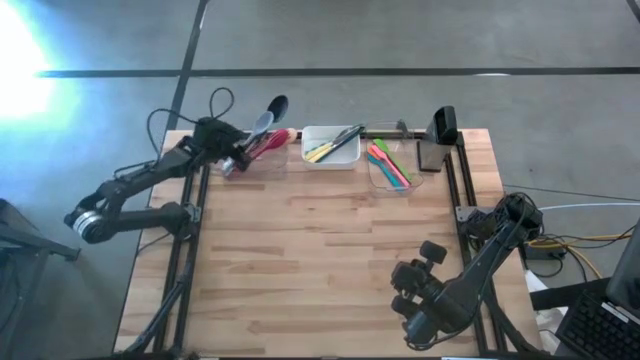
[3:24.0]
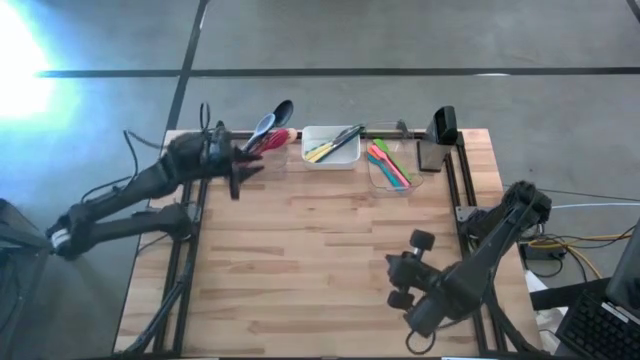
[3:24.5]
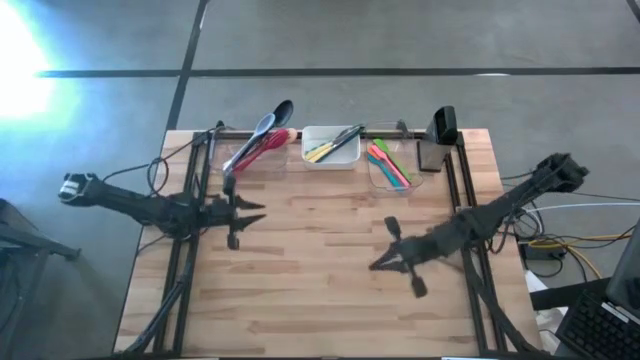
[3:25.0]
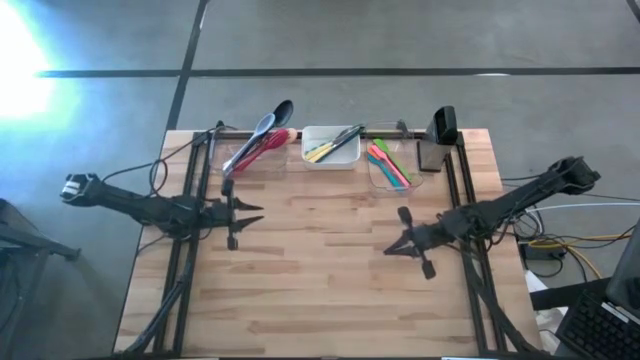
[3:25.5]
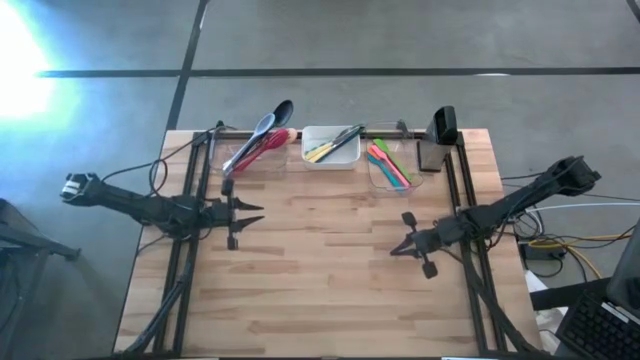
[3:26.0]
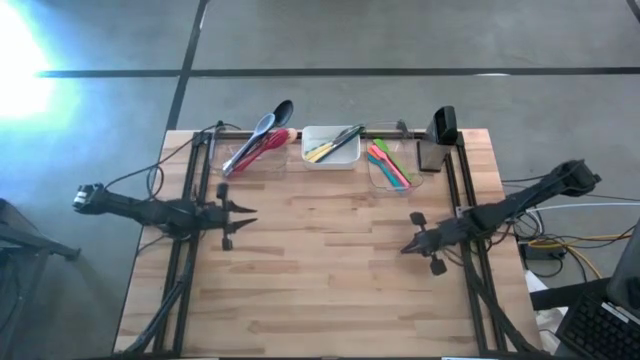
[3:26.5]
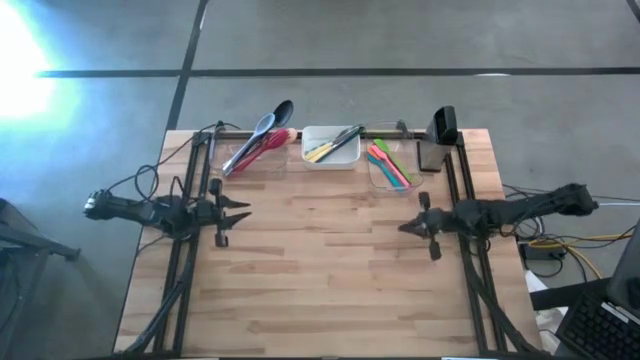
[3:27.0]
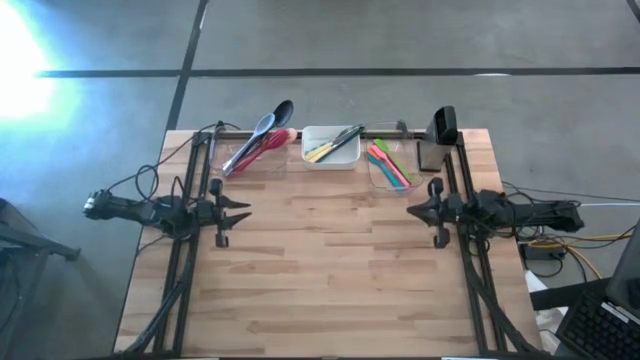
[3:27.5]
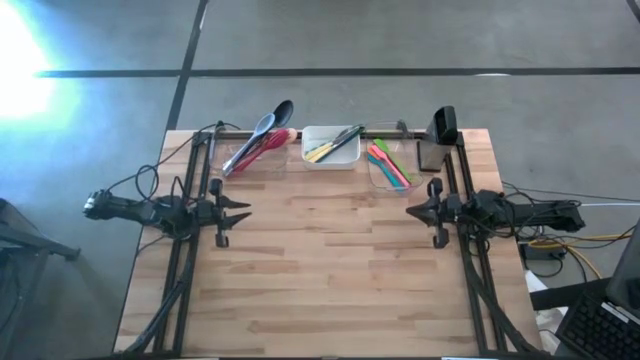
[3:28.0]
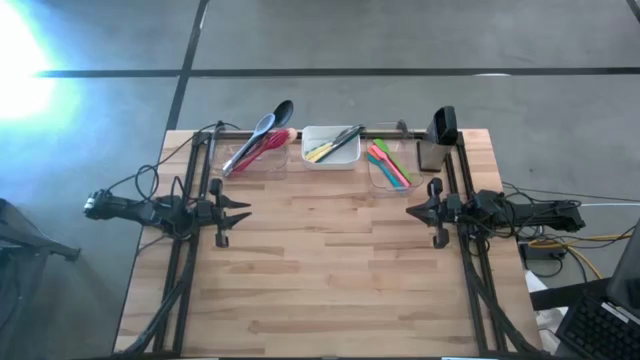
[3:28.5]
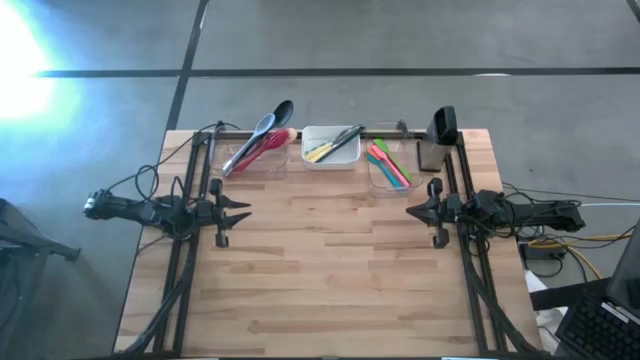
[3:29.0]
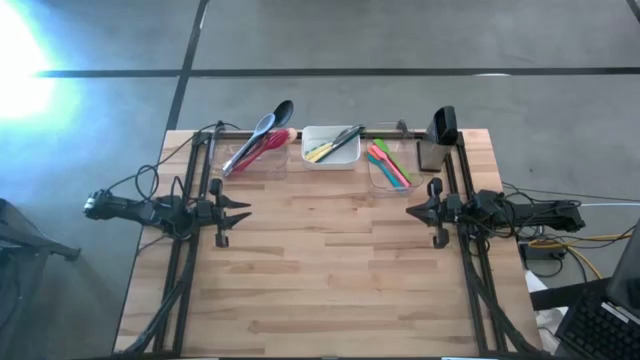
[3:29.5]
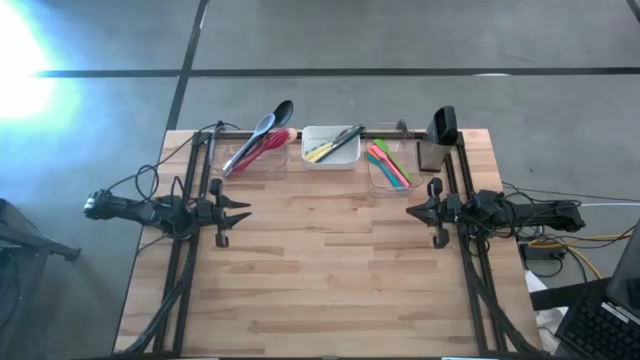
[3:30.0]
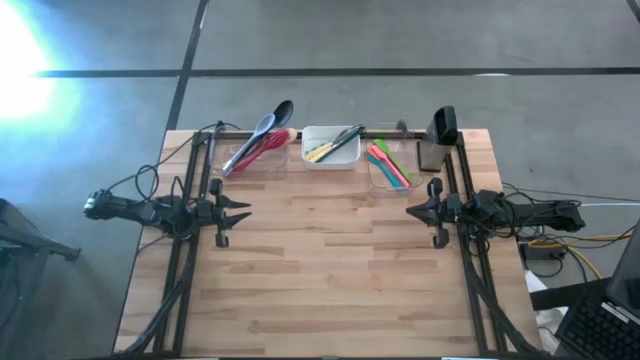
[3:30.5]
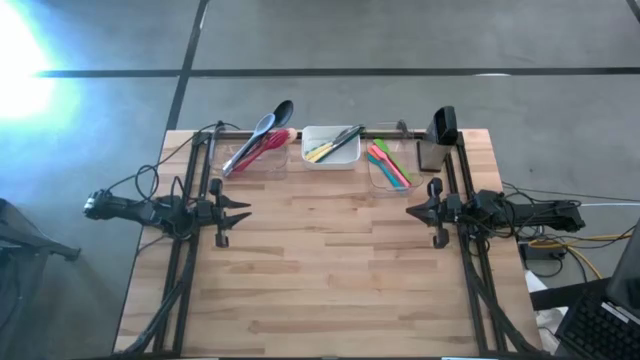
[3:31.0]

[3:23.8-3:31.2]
Task: Pick & Place Kitchen Items
Return to Home Position

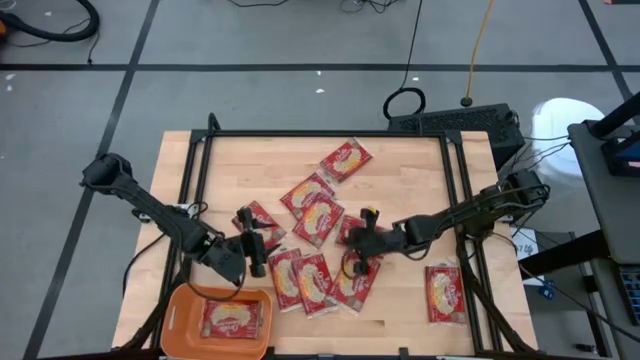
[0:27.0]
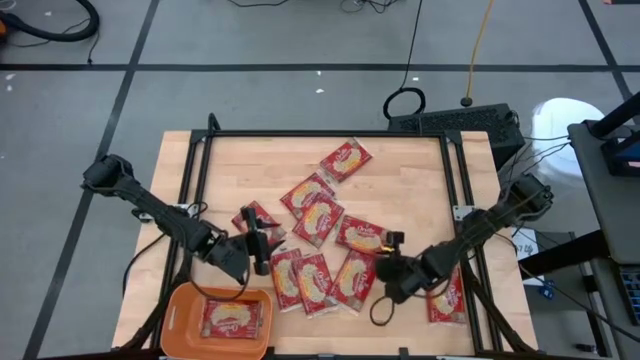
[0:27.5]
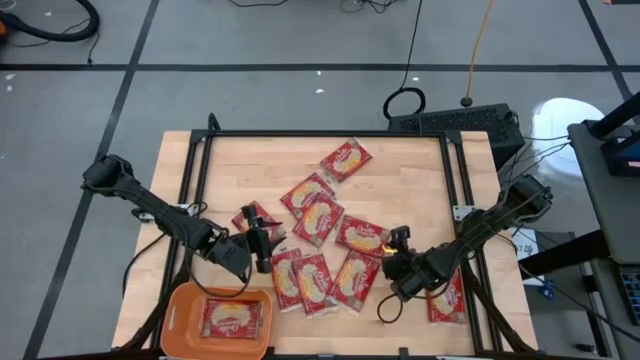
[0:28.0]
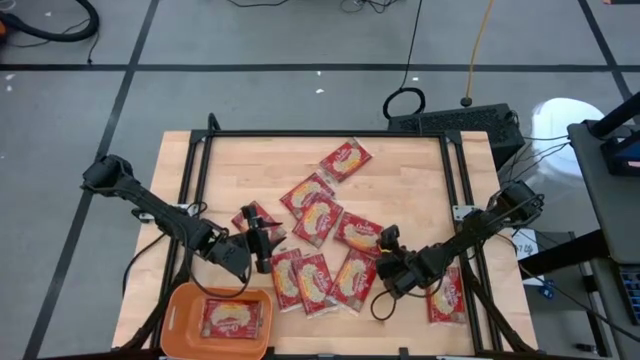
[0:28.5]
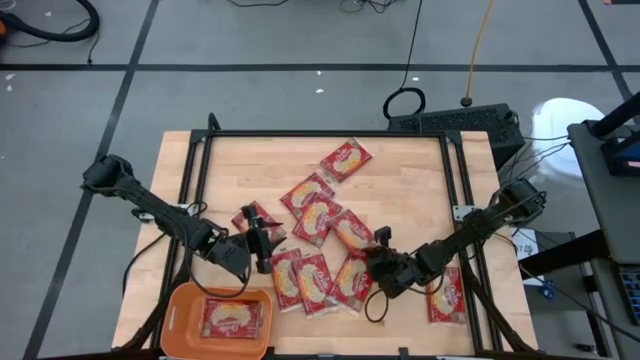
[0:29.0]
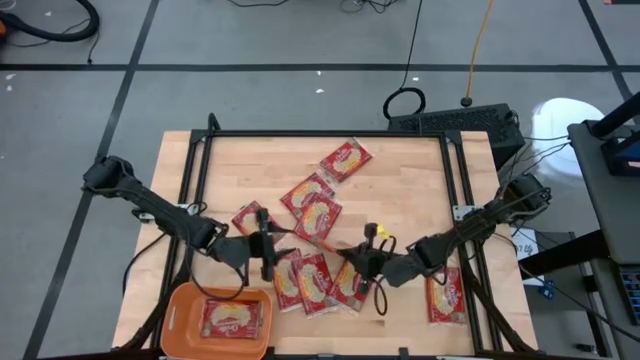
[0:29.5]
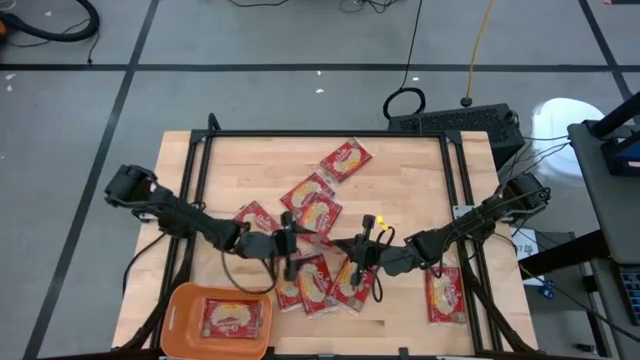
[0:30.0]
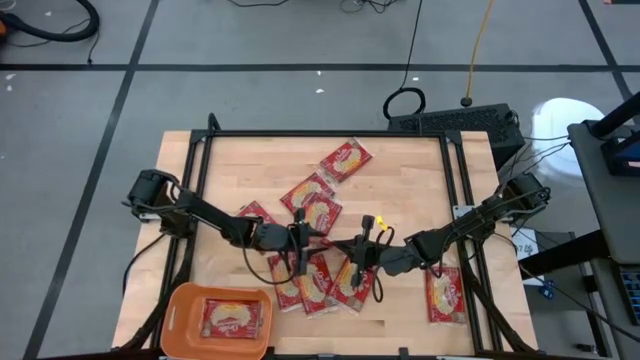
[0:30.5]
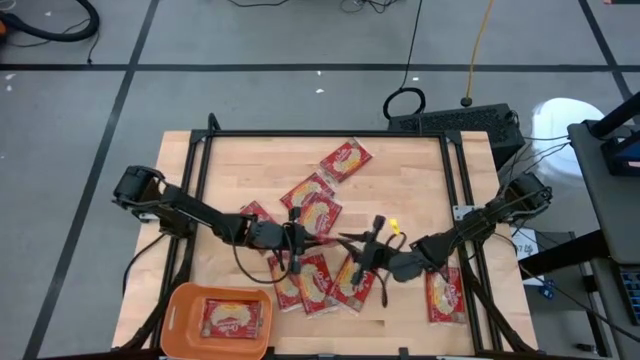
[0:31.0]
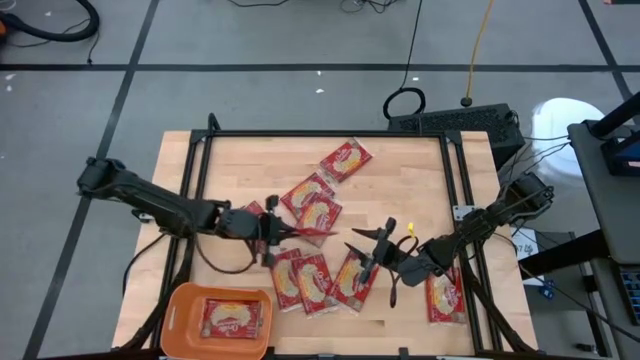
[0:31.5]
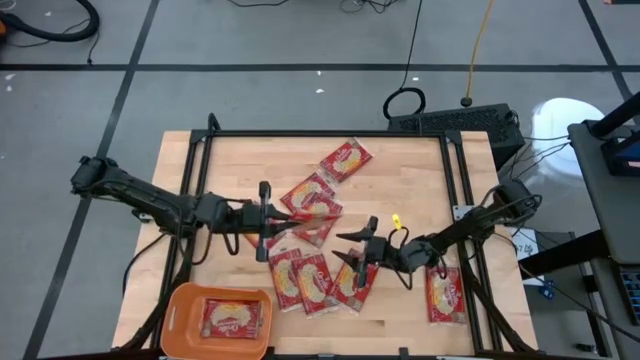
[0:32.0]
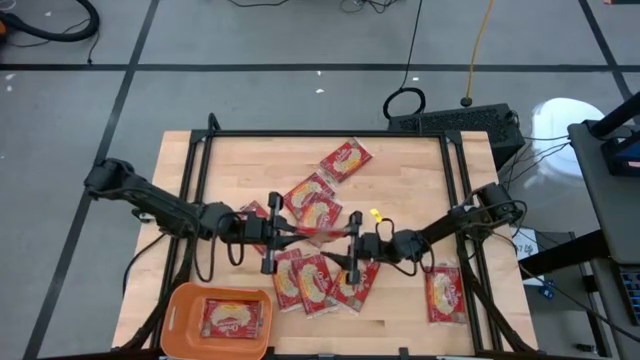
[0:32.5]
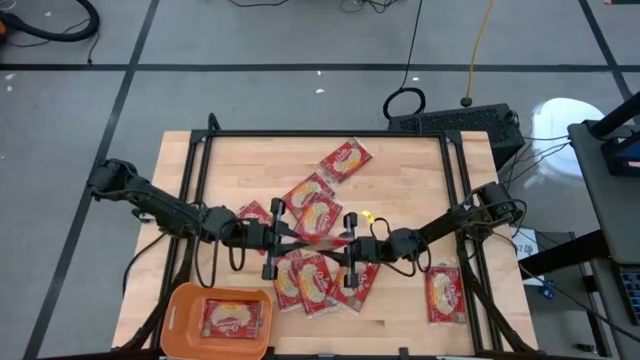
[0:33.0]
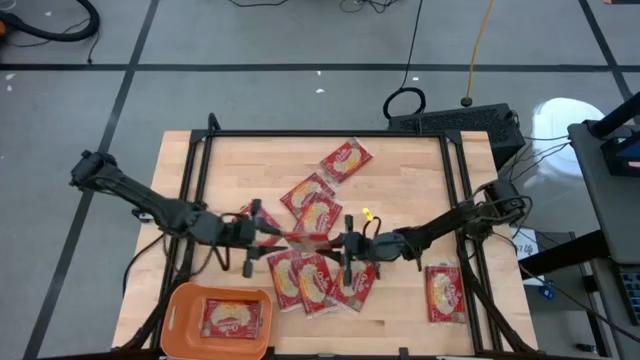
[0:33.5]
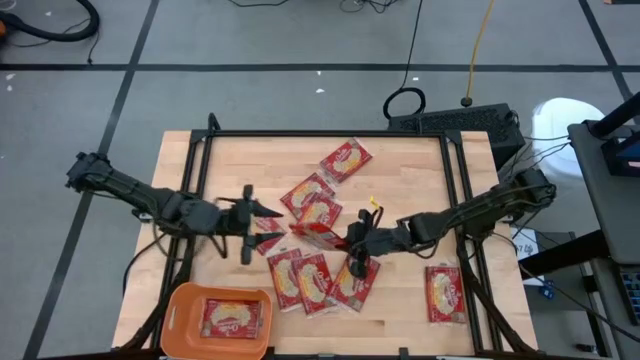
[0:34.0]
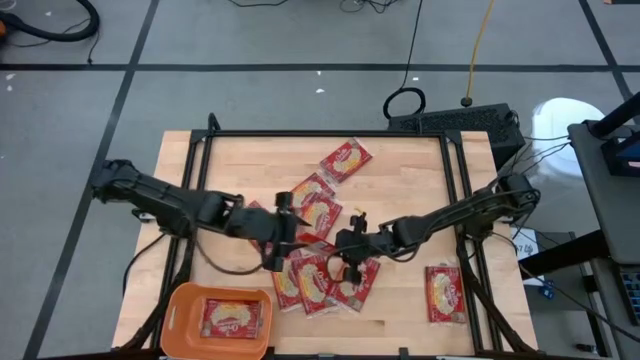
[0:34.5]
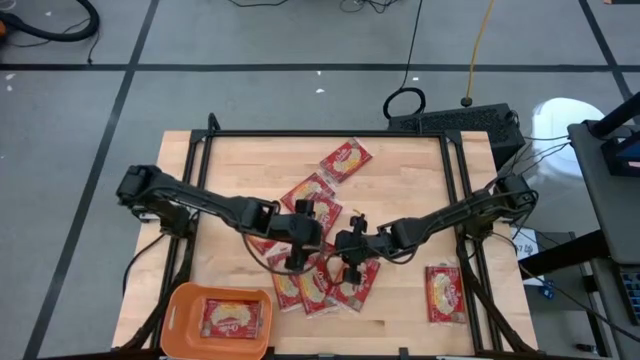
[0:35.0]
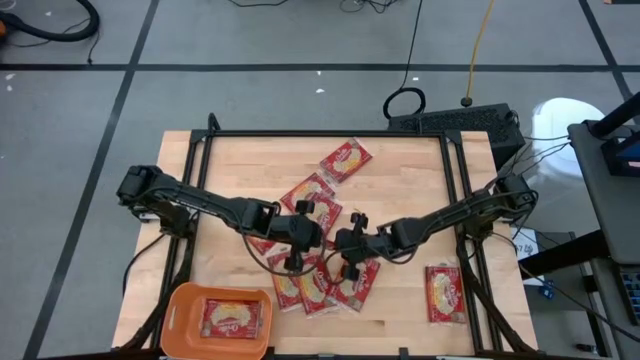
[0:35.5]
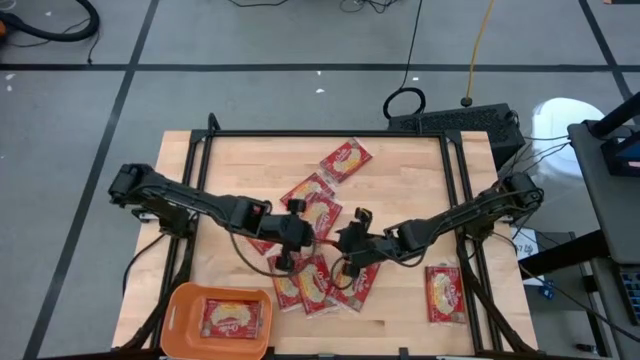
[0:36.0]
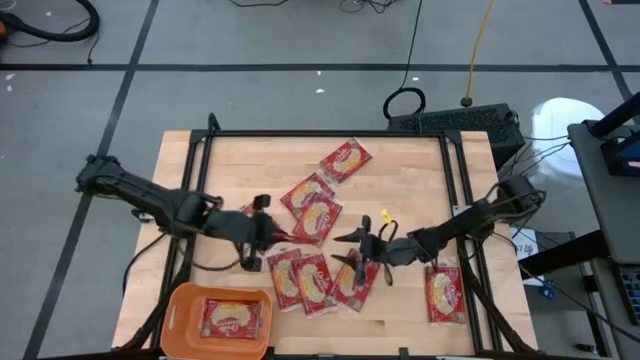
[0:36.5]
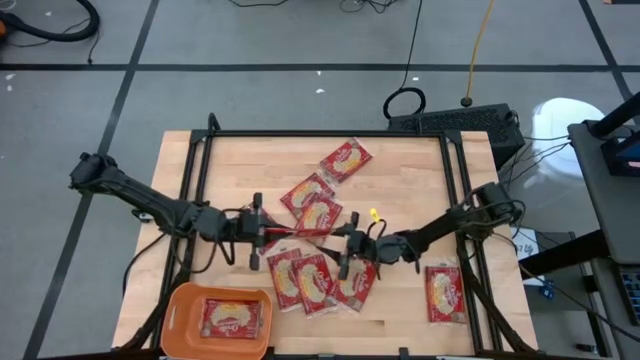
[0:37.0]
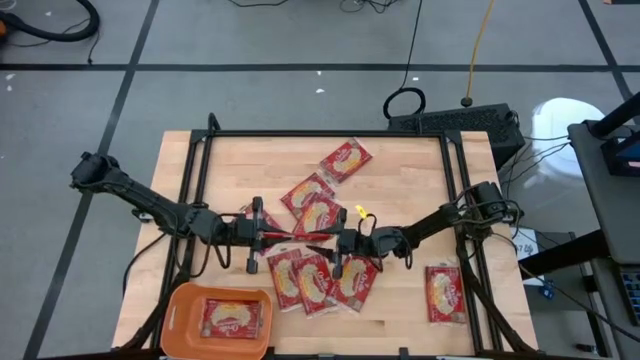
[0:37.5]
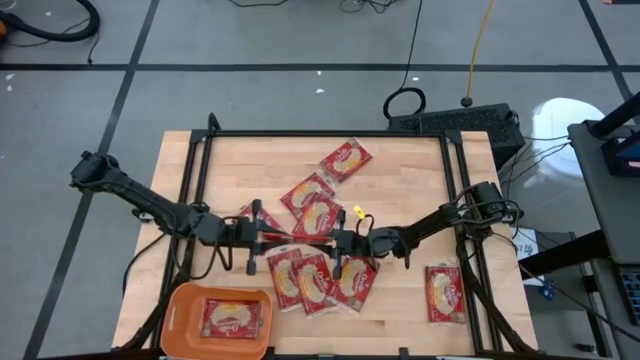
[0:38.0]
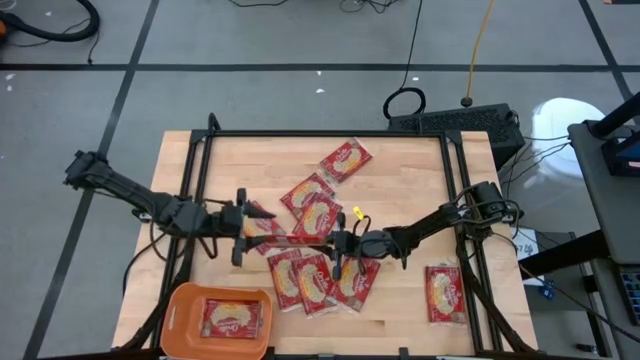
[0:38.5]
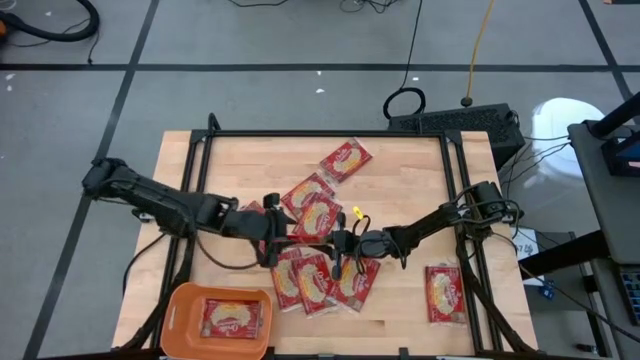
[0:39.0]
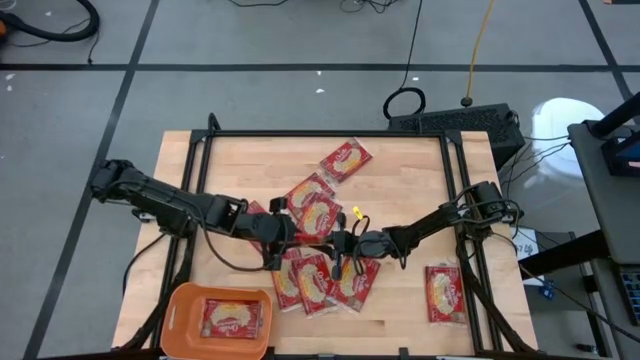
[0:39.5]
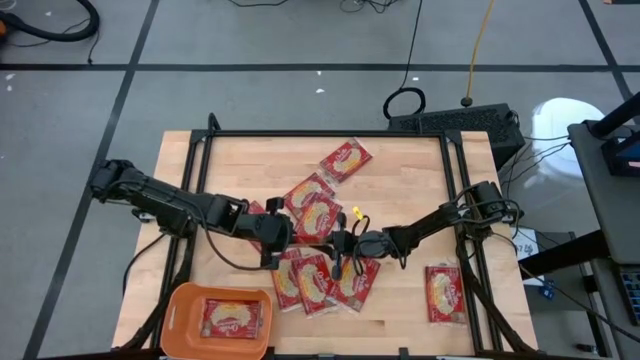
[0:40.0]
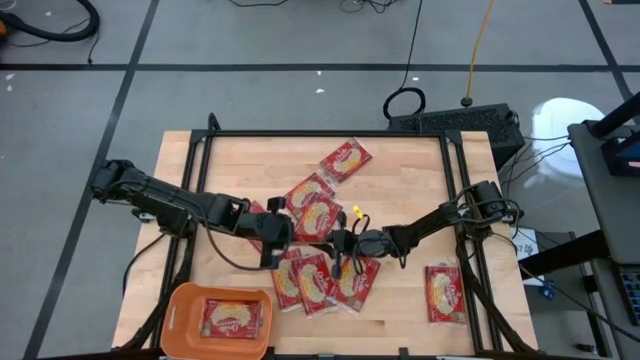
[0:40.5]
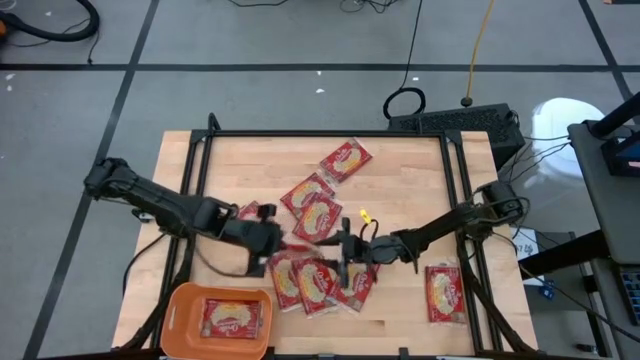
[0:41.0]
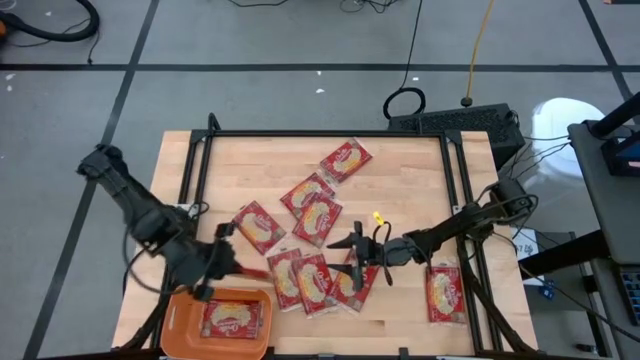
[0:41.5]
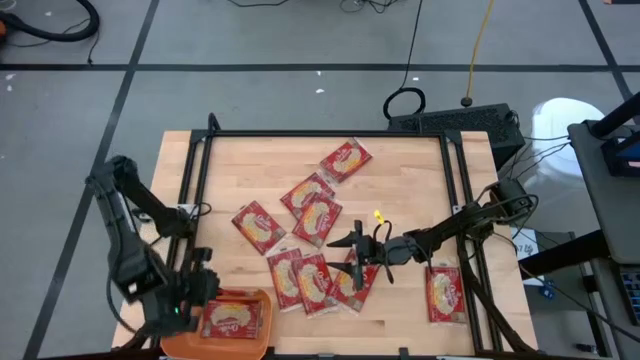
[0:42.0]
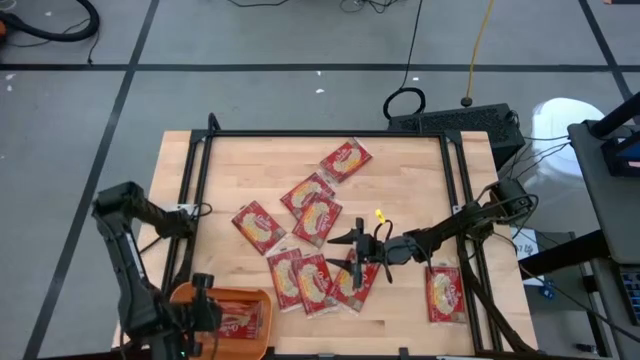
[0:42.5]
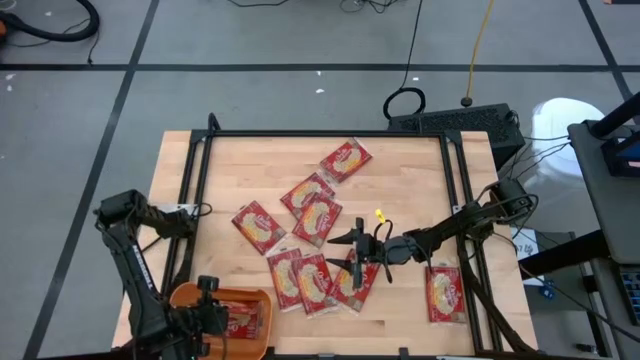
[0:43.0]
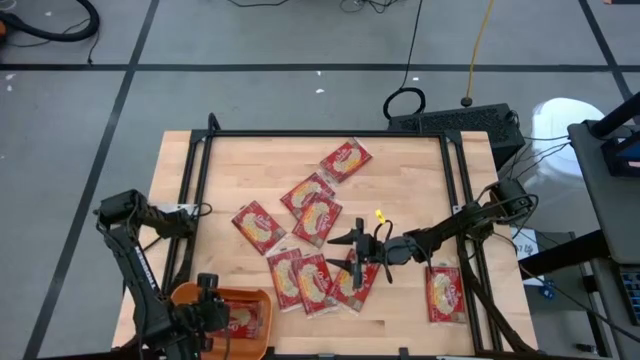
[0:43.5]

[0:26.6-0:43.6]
Task: Sort popcorn bags into baskets
Put the popcorn bag into the orange bin
